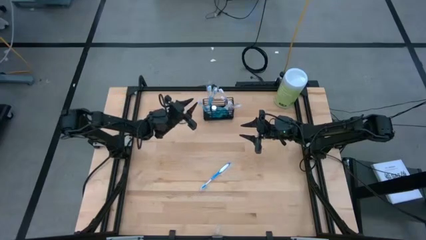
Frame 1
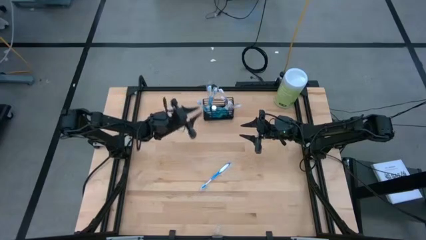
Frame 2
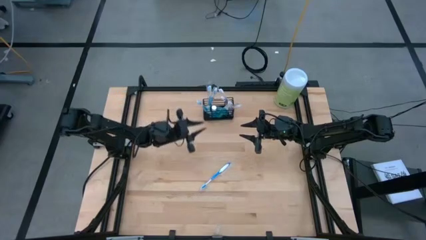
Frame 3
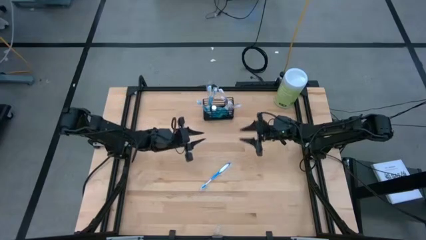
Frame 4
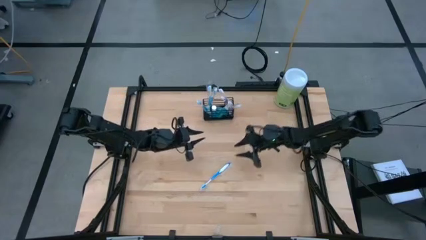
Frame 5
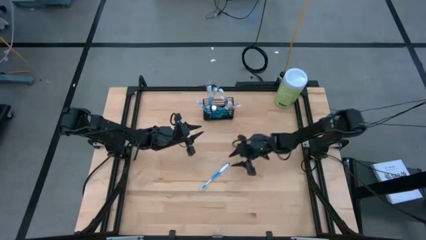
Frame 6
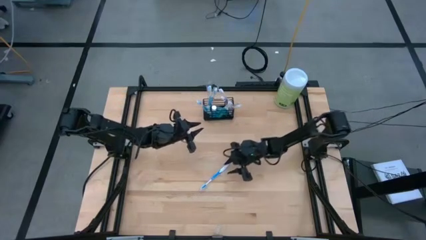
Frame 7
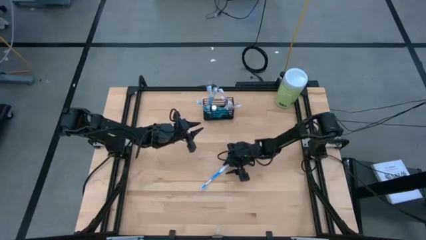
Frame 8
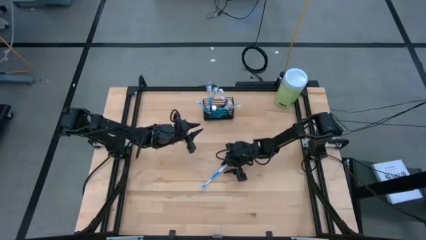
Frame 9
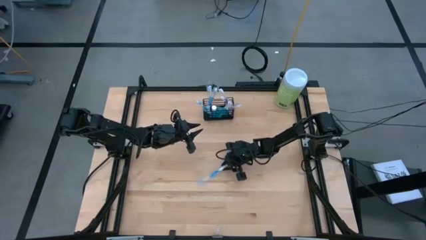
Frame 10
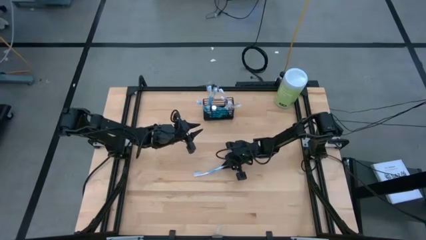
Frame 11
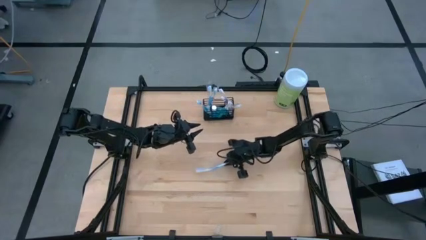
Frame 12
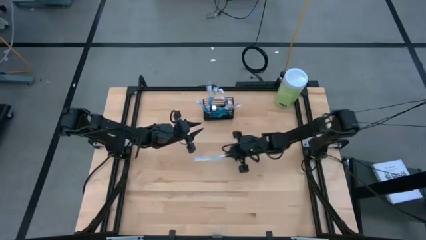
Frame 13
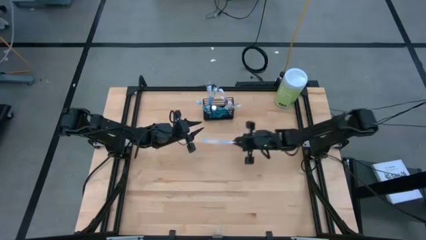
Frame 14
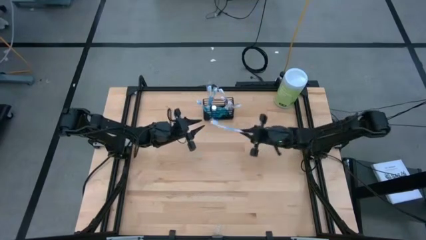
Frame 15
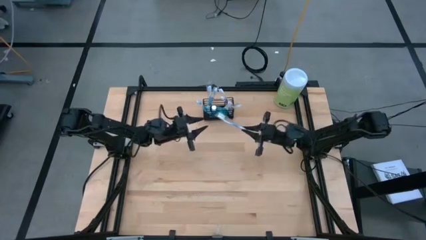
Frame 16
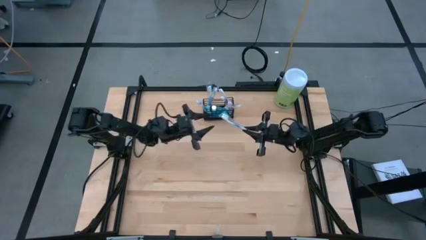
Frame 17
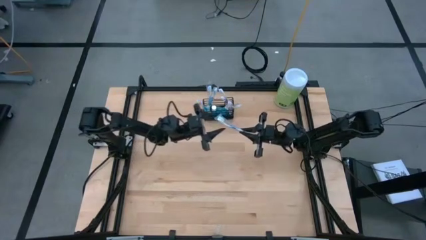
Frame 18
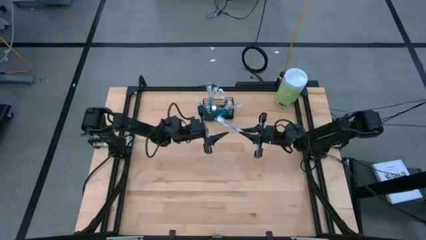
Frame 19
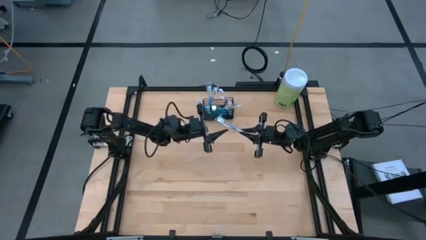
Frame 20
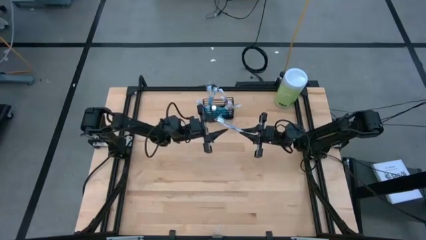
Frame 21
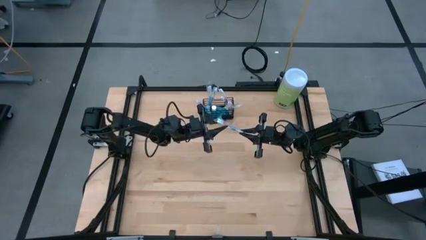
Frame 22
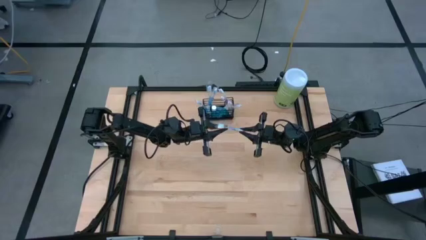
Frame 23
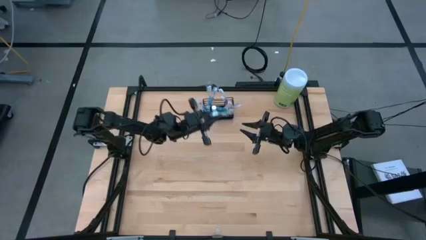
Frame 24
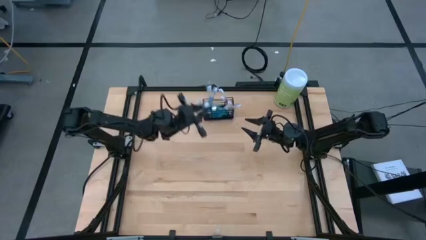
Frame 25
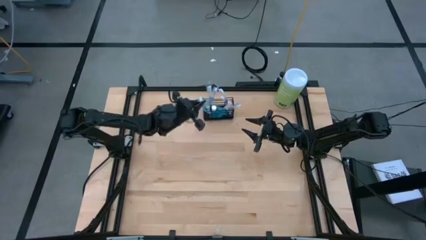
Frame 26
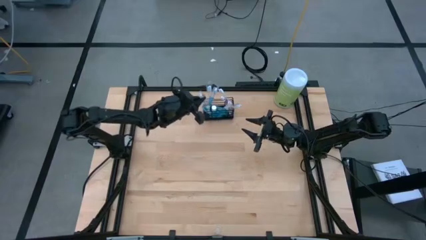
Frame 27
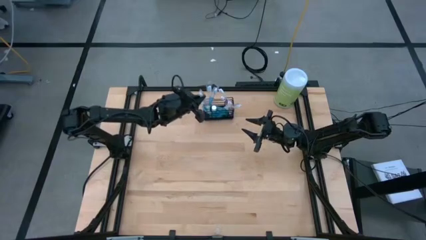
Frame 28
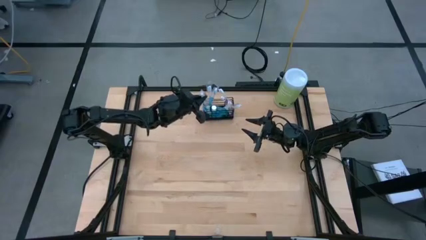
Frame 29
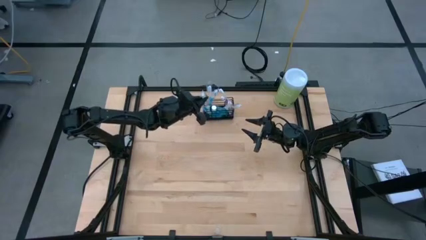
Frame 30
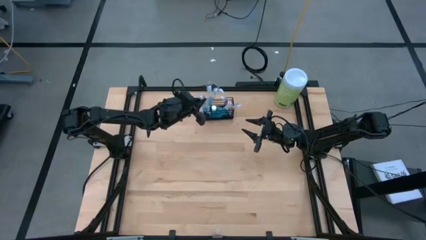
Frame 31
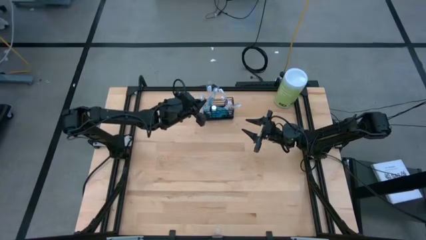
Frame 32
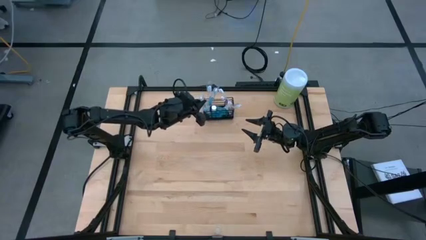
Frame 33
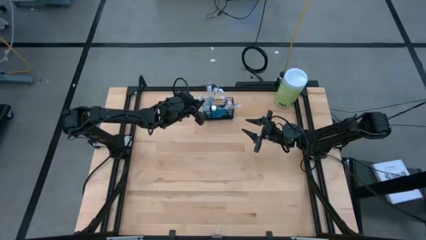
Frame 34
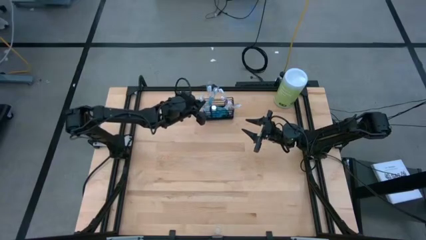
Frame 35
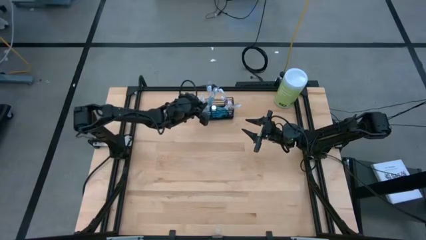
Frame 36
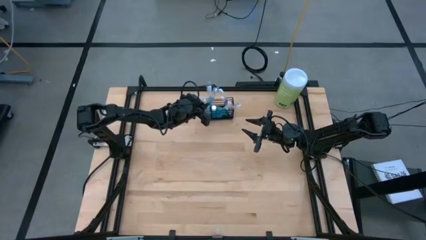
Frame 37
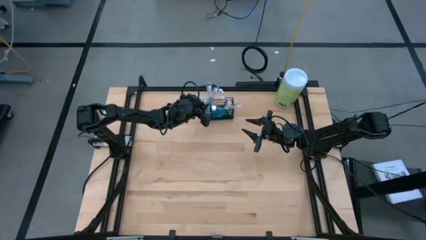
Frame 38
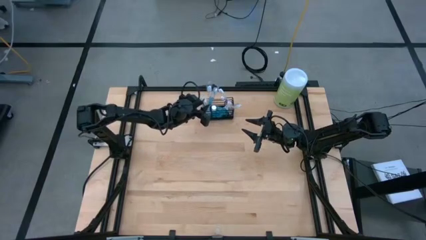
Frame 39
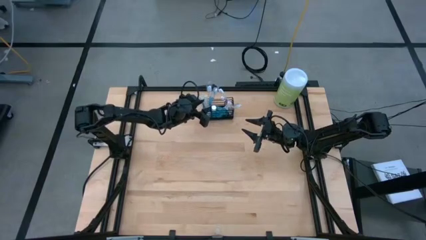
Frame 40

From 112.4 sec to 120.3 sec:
Task: Pick & Place toothbrushing station
Put the blue toothbrush into the left compartment of the wire organizer

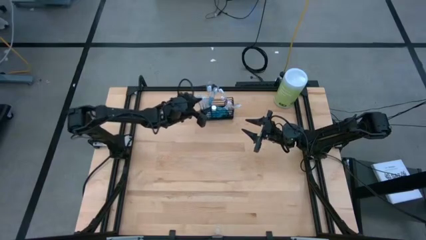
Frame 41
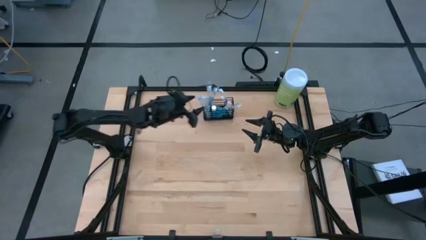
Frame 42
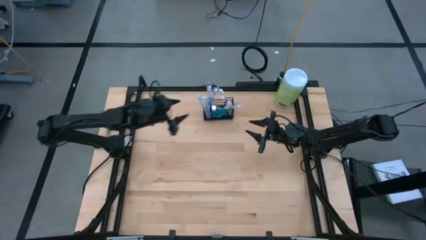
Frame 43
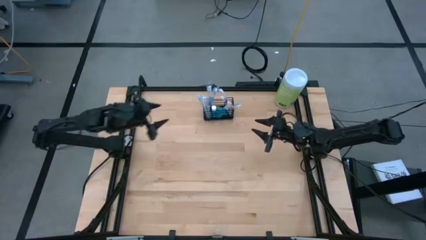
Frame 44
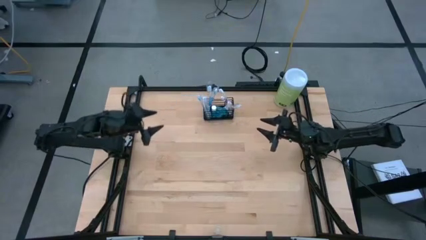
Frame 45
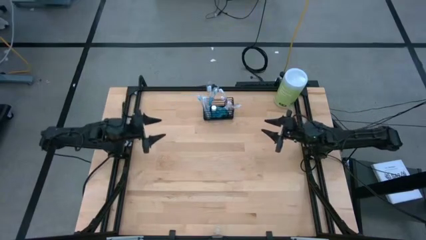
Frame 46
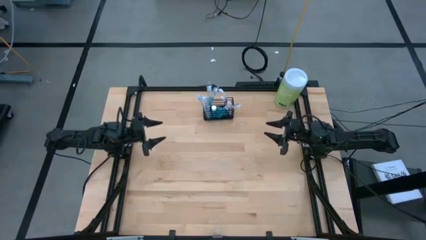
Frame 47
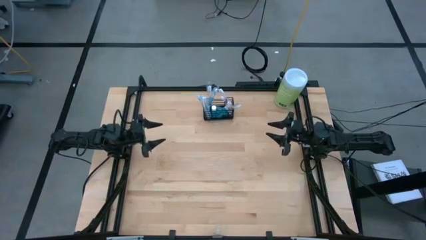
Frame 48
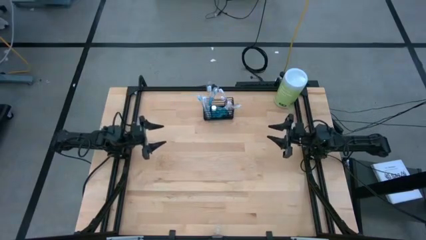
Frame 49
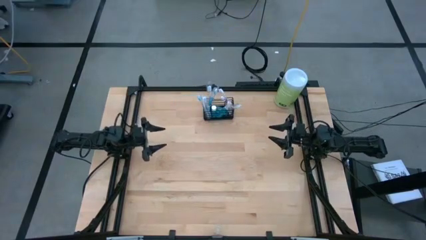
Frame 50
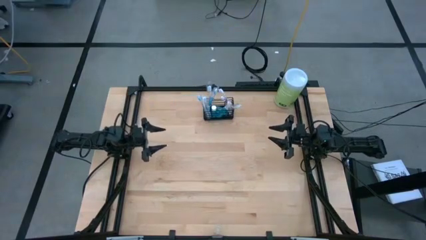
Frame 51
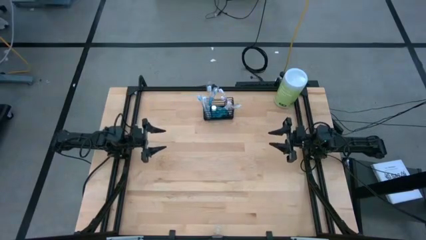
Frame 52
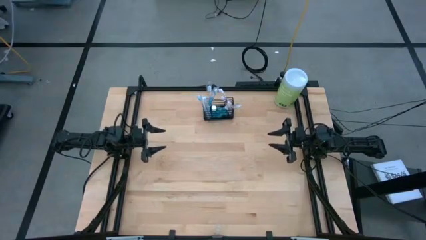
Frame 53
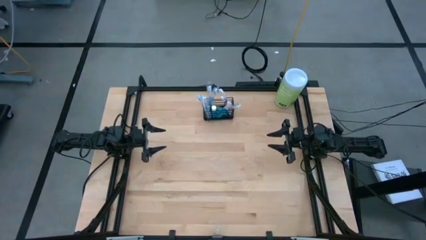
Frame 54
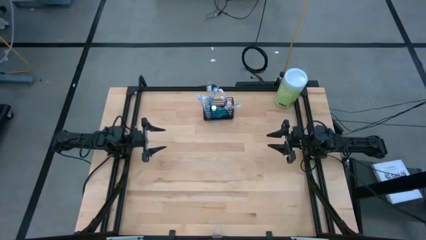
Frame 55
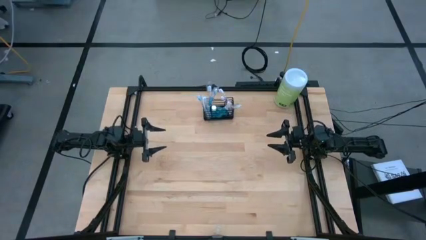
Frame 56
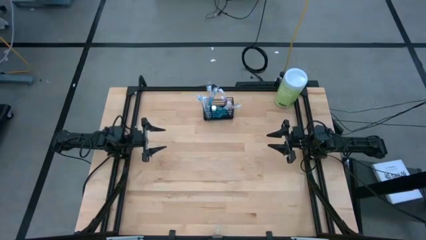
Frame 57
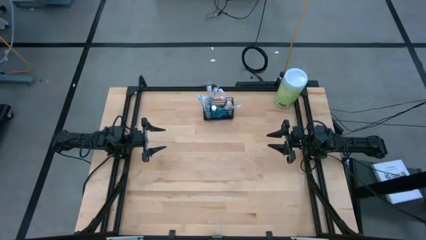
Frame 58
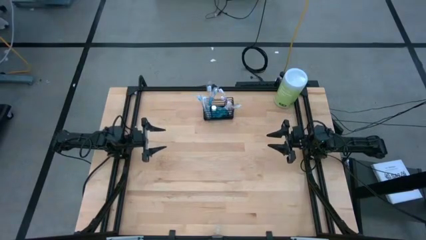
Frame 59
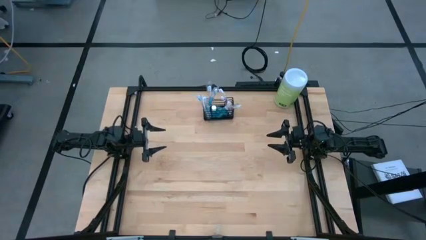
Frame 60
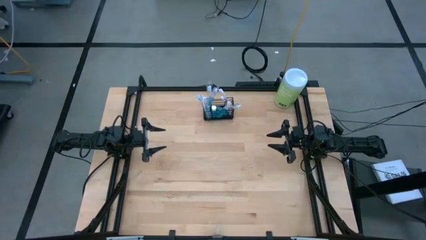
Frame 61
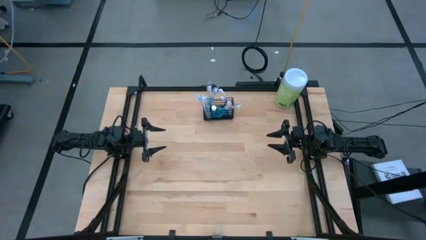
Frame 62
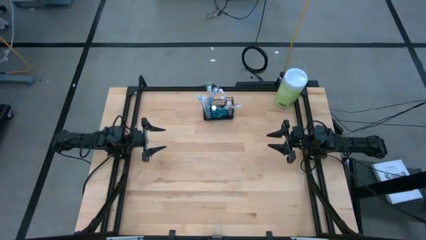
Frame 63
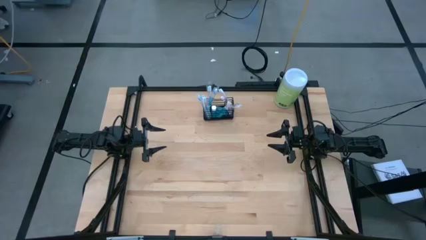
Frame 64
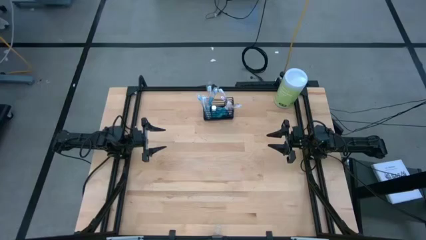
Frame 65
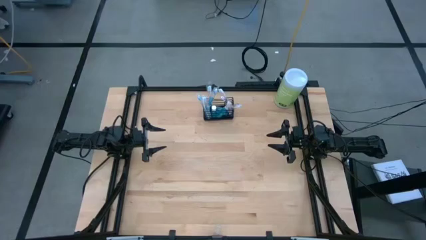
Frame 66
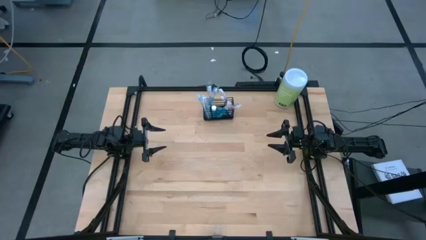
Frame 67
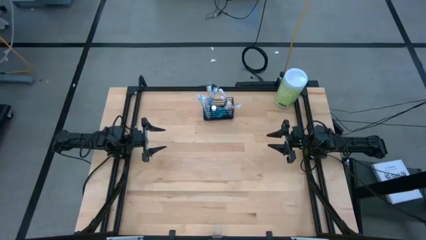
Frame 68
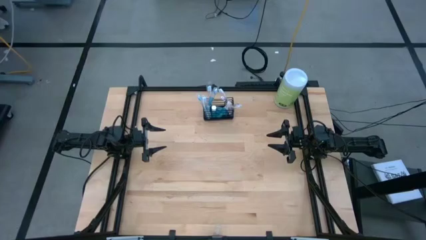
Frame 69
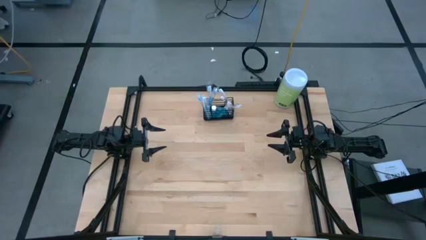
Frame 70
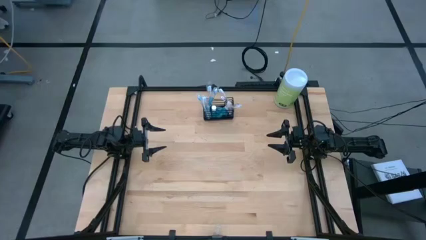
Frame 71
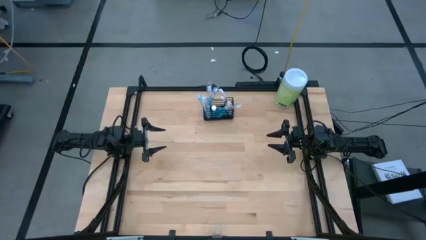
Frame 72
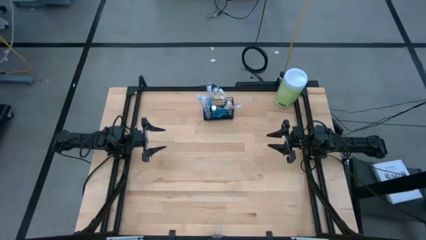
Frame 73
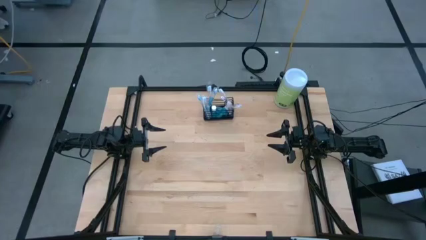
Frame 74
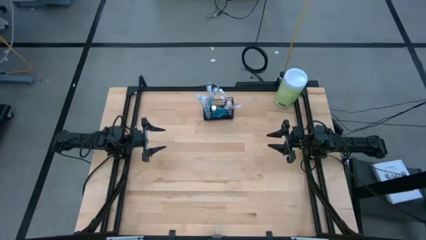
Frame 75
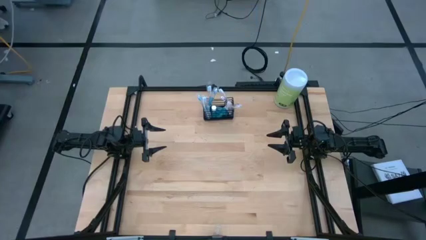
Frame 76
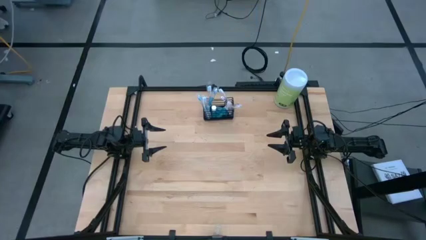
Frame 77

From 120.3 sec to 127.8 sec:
Return to home position

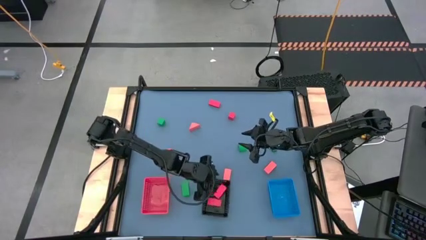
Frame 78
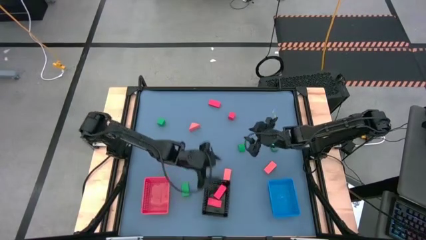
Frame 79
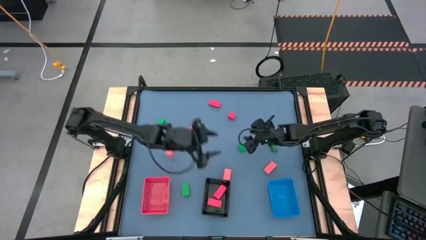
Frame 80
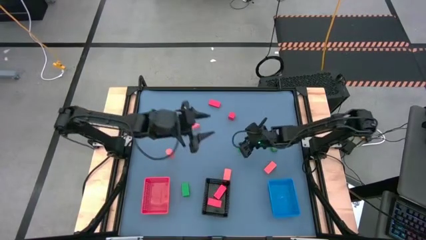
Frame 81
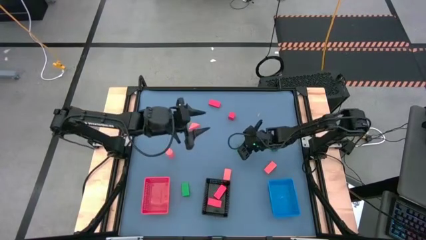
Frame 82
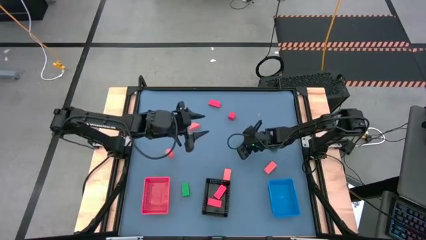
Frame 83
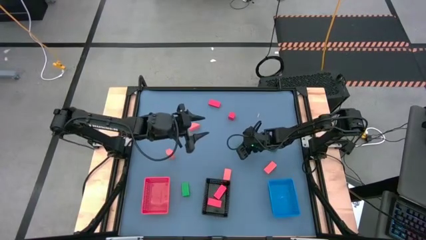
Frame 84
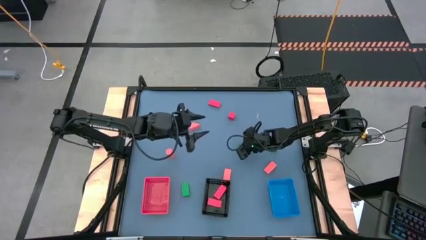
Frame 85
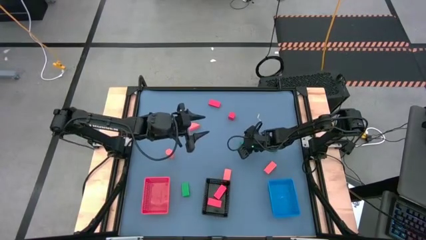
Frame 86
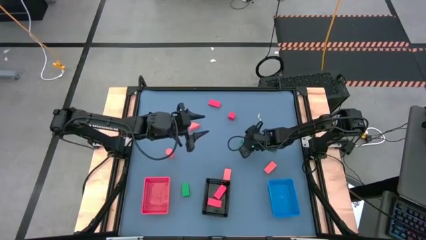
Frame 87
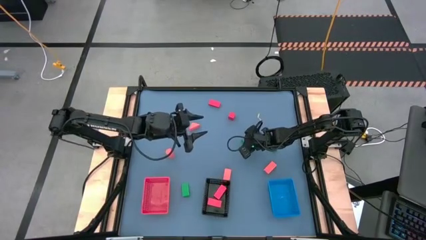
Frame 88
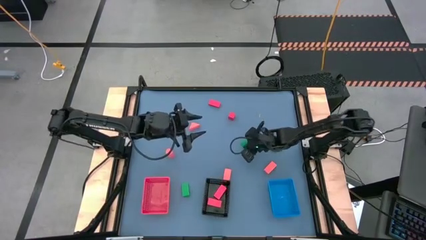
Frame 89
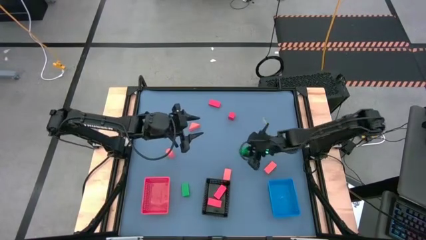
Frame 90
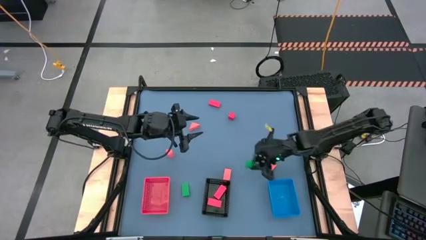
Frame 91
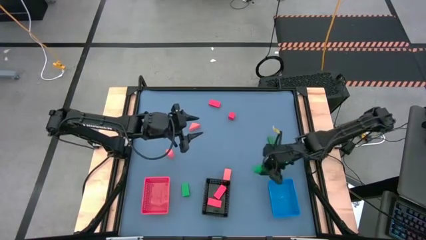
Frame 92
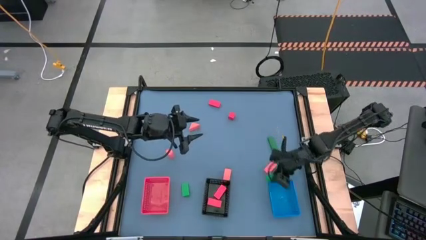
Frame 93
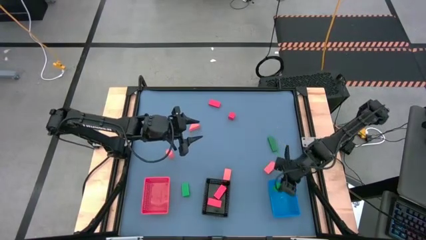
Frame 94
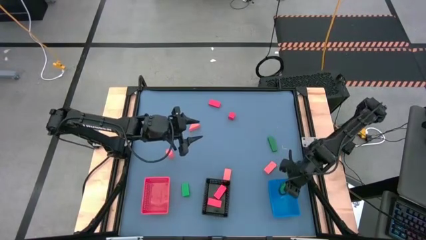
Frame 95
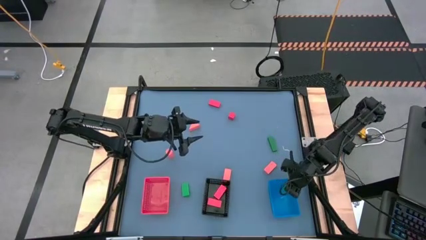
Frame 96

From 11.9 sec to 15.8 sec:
Task: Sort & place blocks by color
Put the green block into the blue bin
